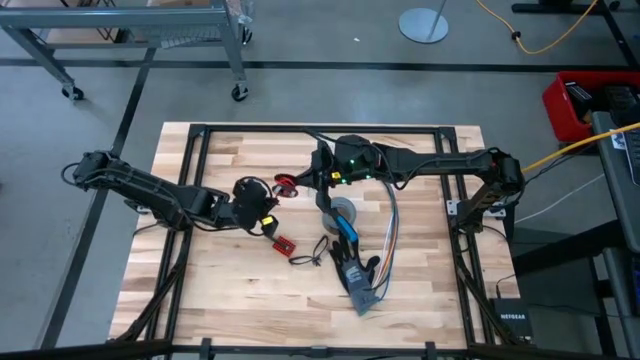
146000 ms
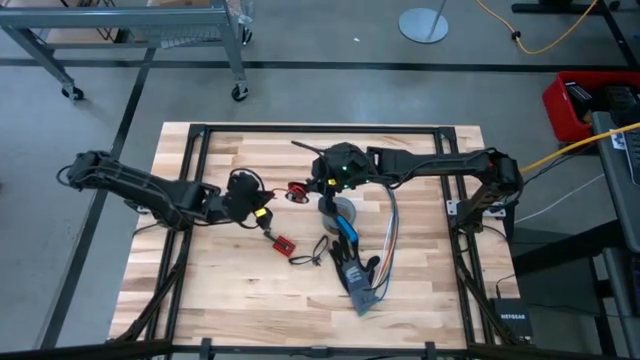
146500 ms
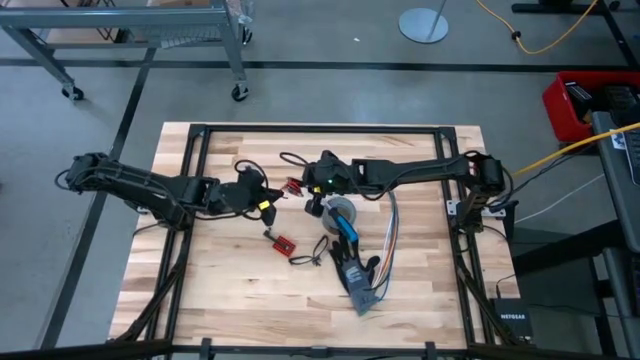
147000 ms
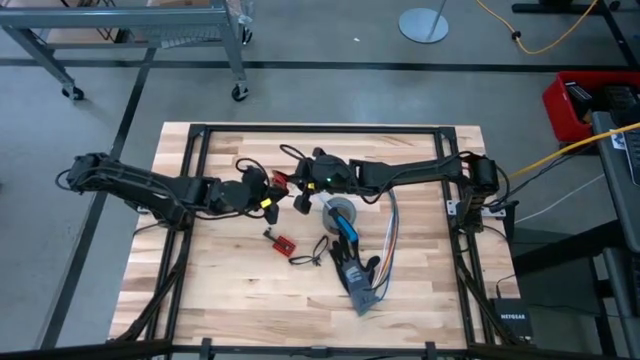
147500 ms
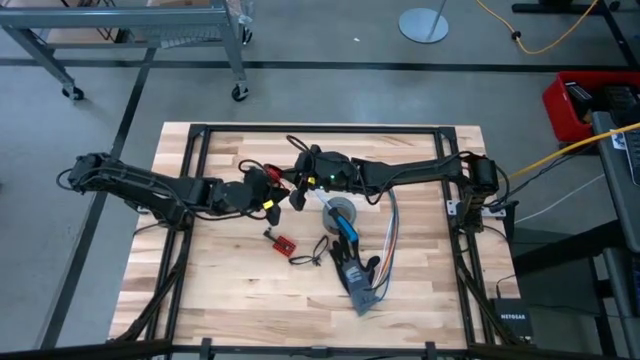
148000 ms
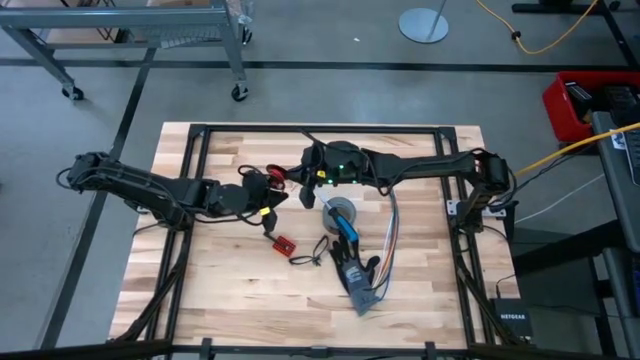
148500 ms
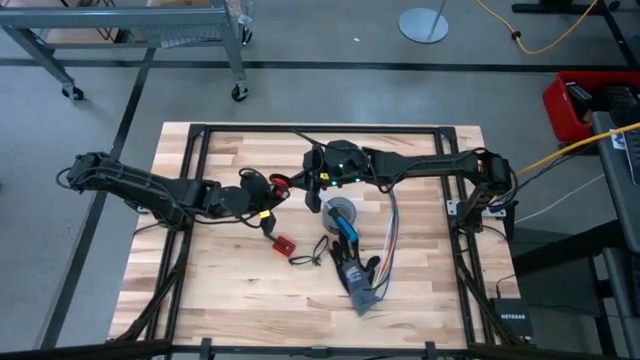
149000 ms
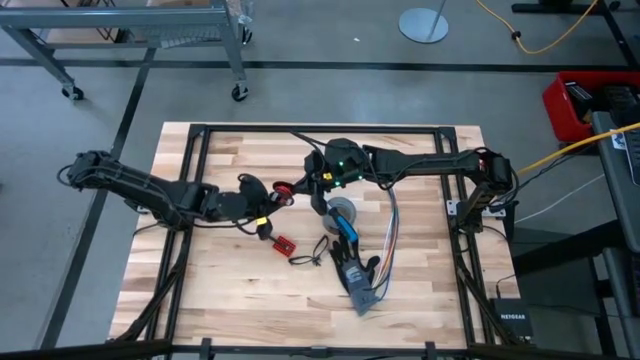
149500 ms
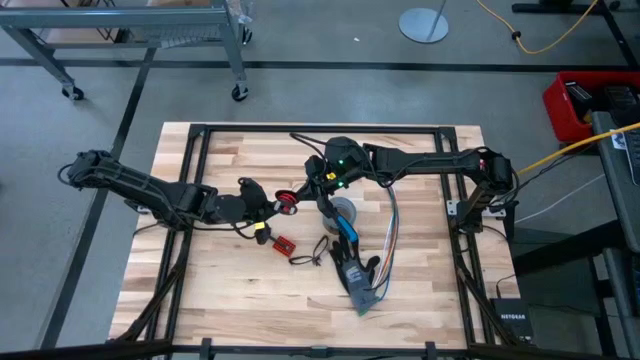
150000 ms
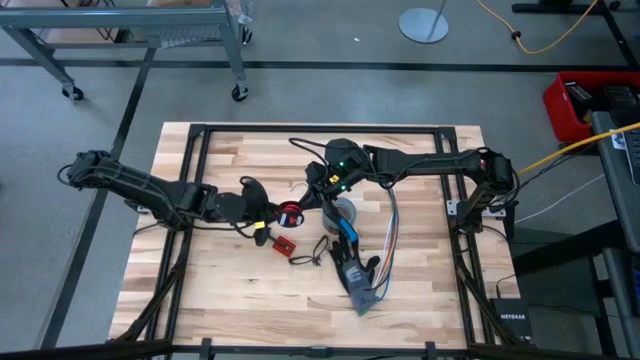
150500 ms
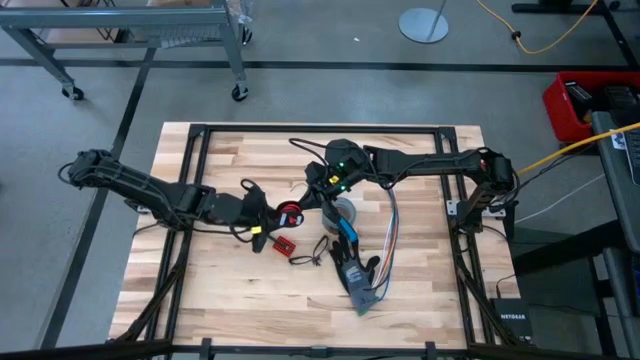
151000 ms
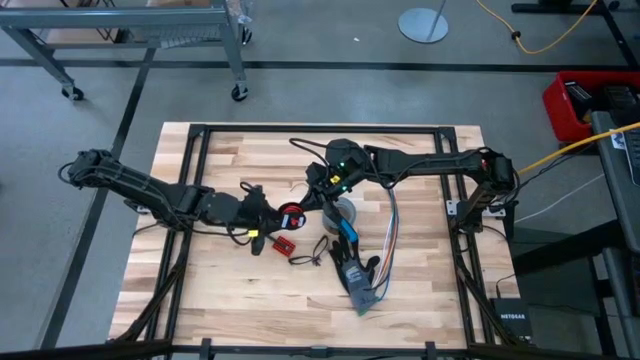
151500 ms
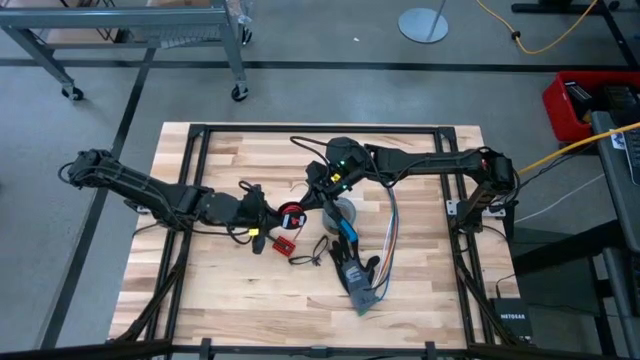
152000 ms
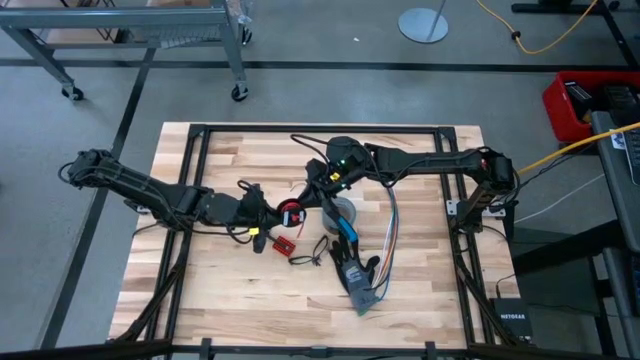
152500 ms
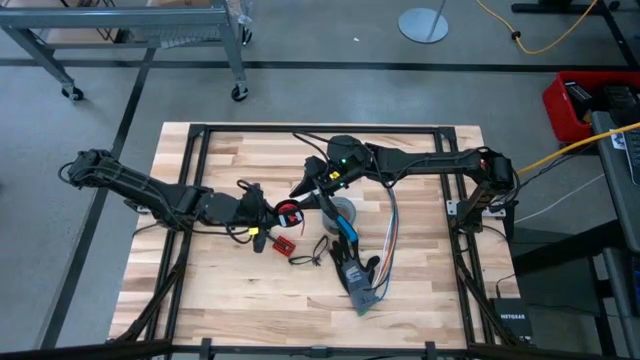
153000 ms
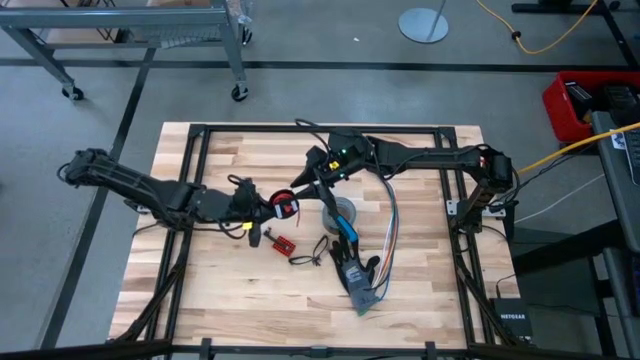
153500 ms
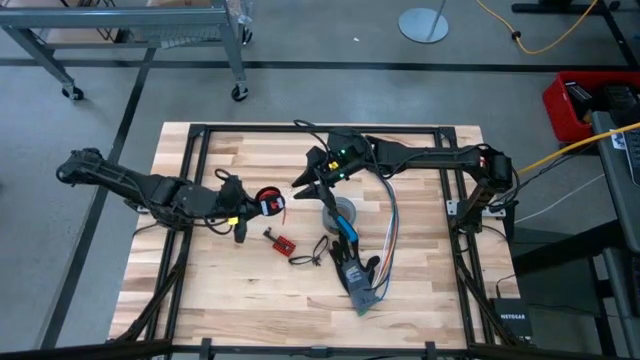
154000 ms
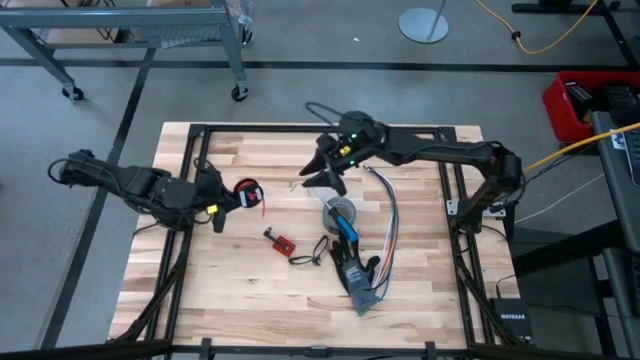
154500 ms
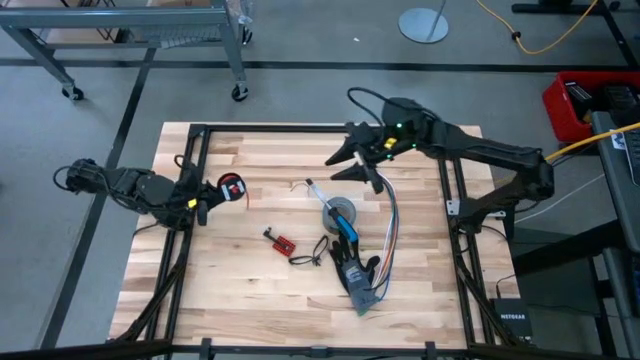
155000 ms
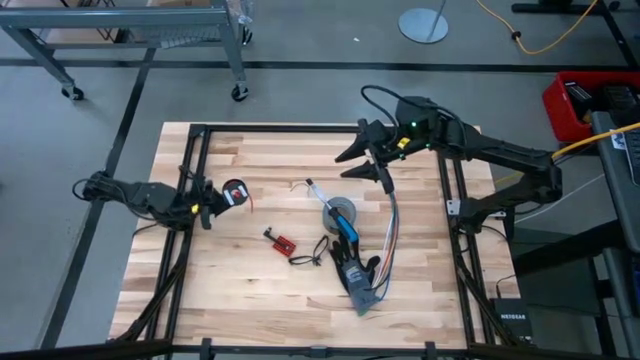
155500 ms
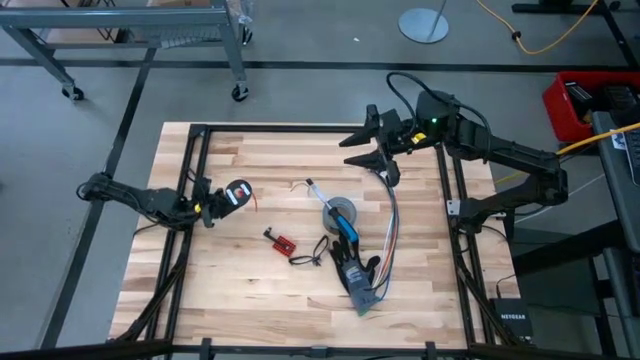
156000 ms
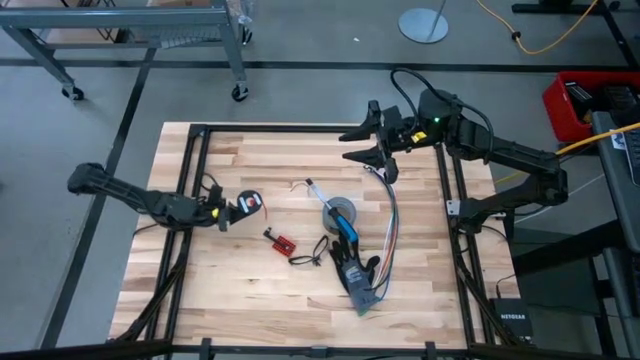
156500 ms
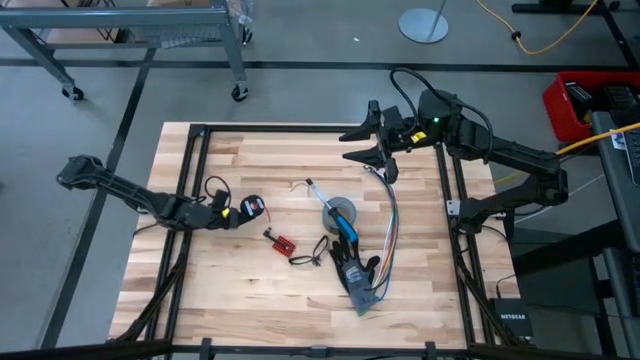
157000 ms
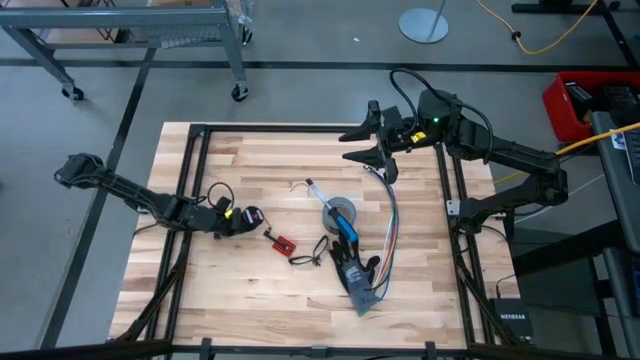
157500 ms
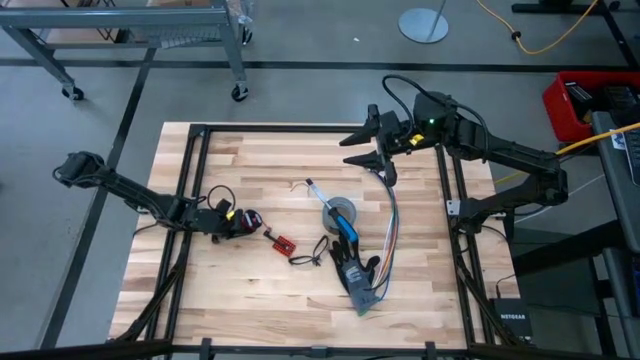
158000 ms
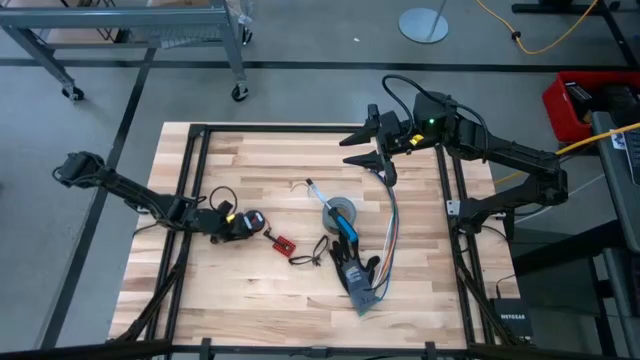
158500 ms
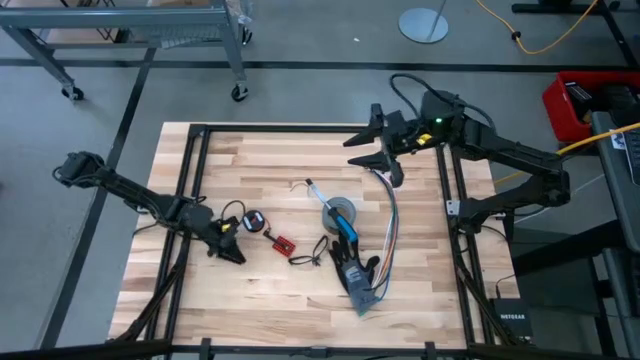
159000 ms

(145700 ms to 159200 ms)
Task: Coil cords
Coil the red wire around the spool

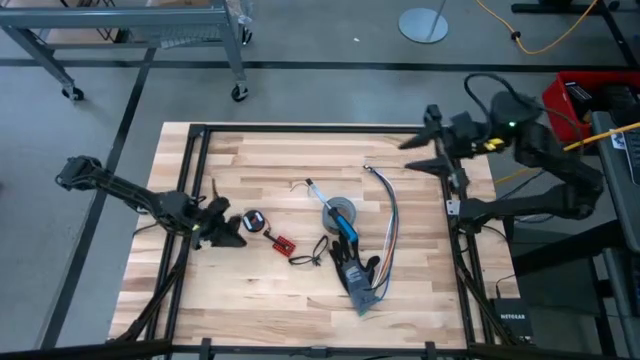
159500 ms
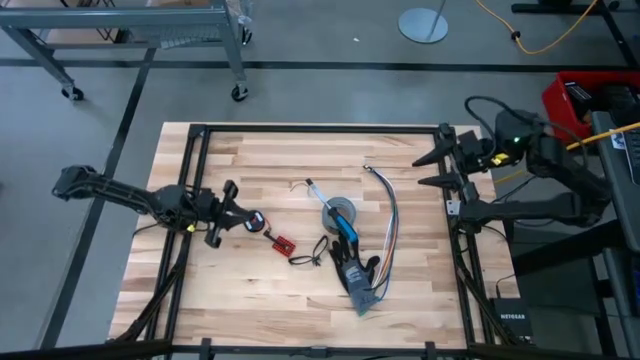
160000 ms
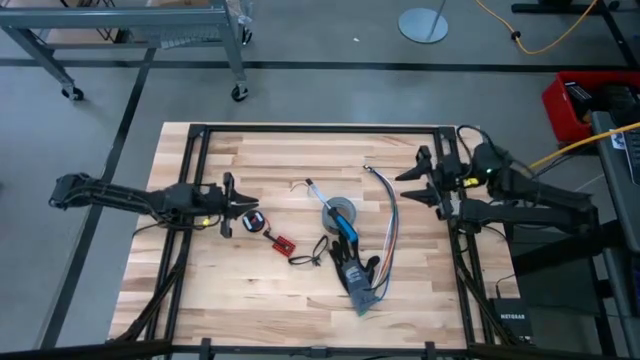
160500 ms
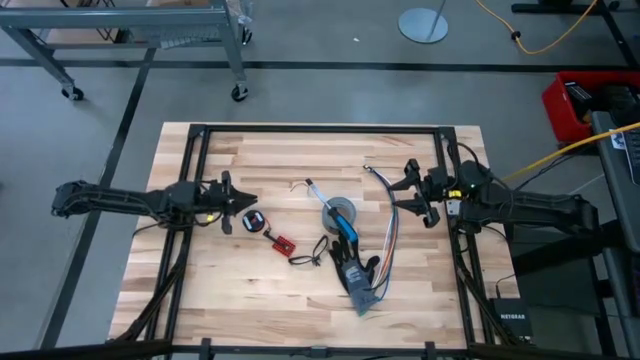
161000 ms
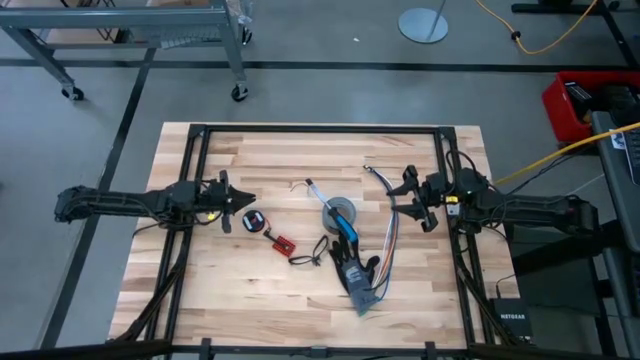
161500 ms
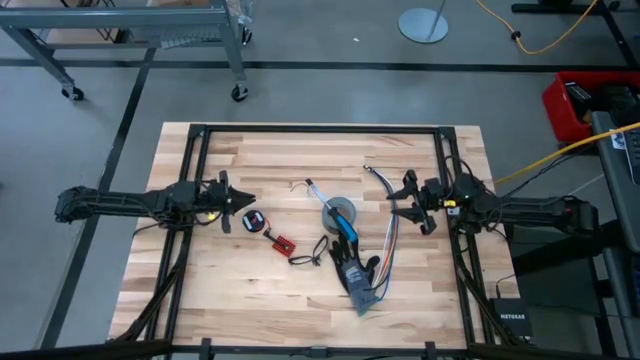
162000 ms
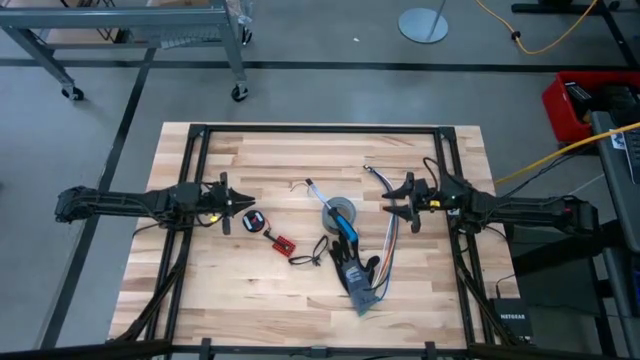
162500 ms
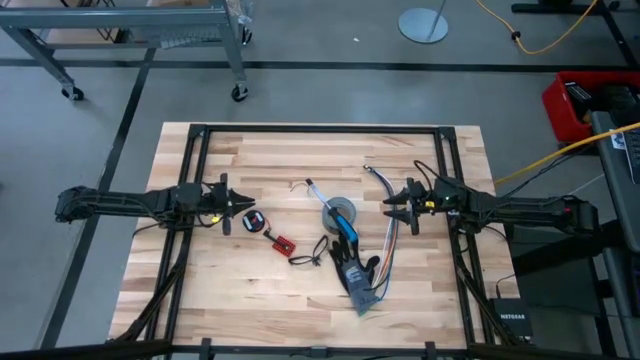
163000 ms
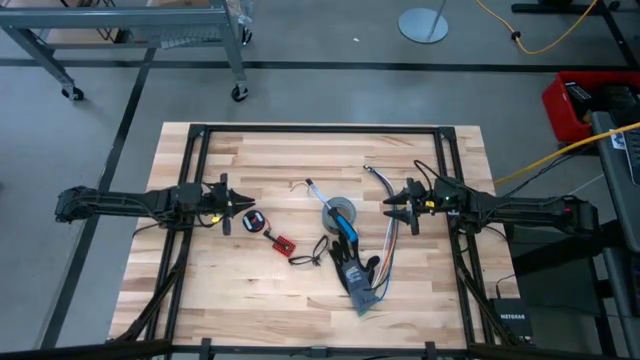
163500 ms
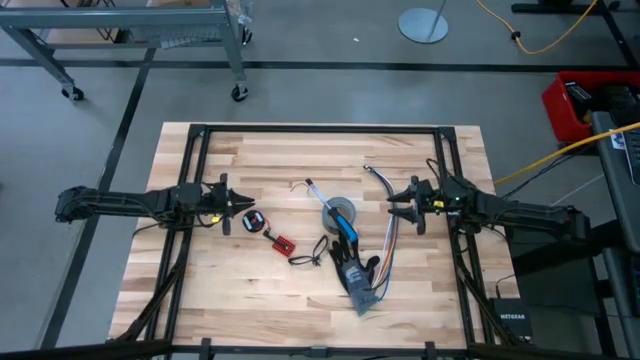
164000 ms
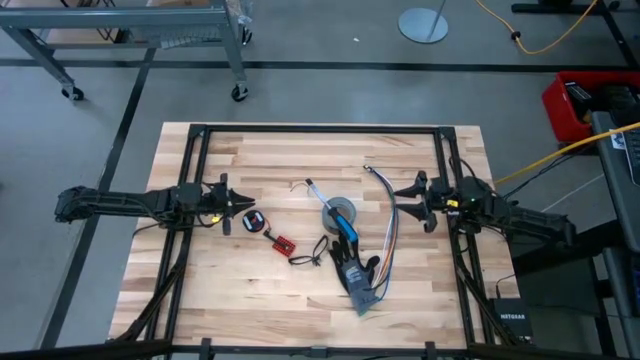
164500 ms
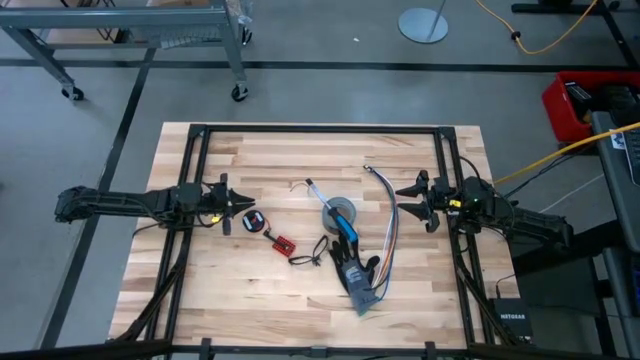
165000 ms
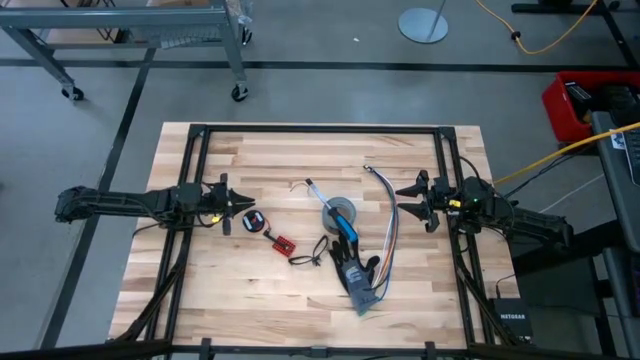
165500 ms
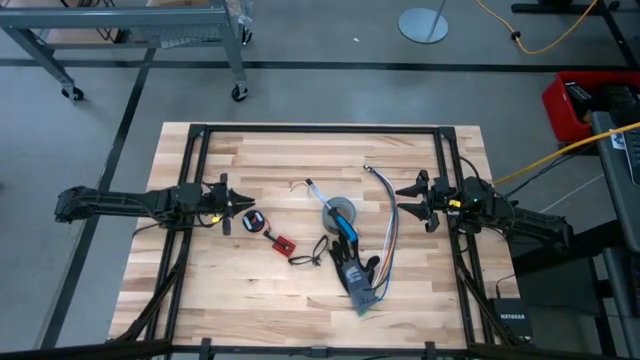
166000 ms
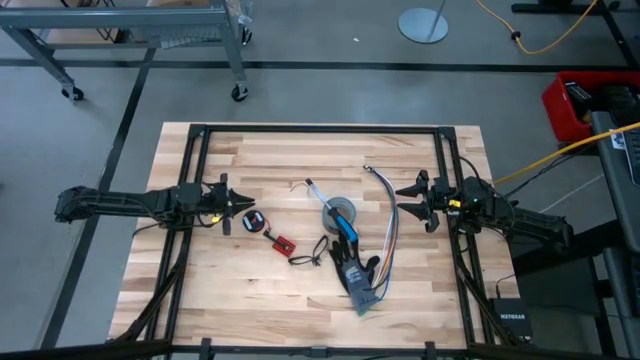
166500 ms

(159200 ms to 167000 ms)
Return to Home Position
